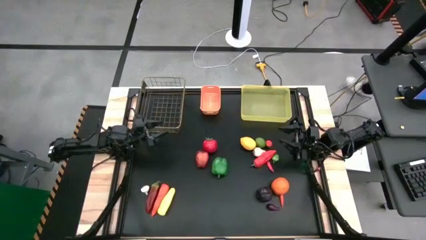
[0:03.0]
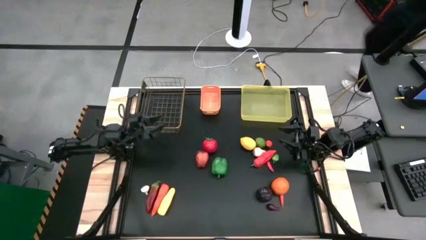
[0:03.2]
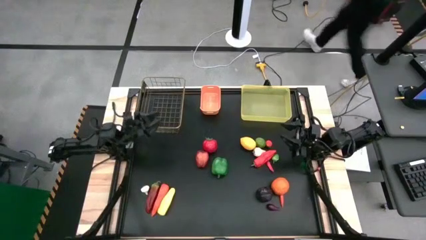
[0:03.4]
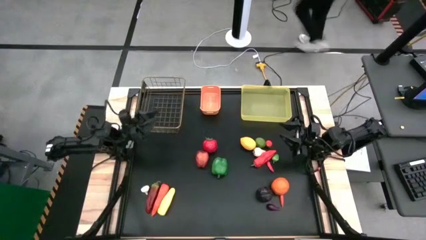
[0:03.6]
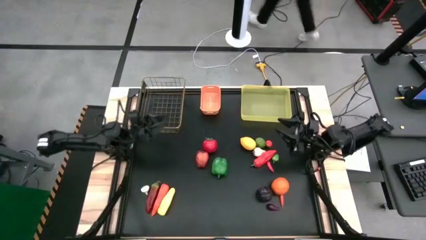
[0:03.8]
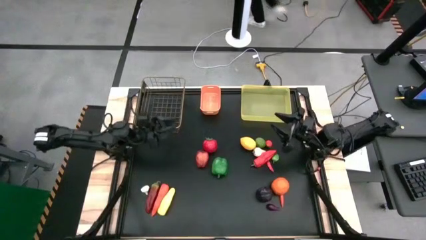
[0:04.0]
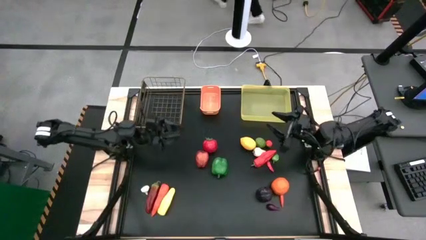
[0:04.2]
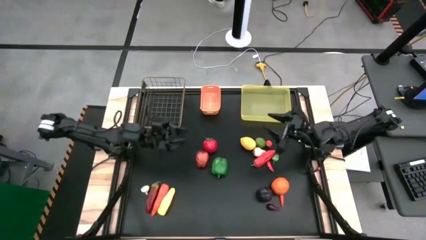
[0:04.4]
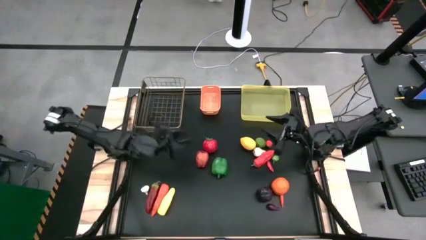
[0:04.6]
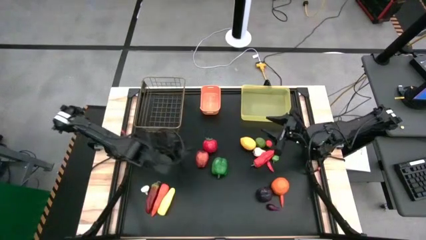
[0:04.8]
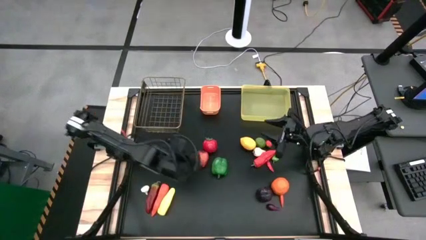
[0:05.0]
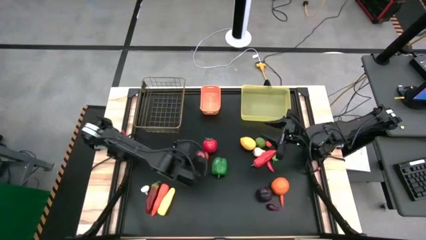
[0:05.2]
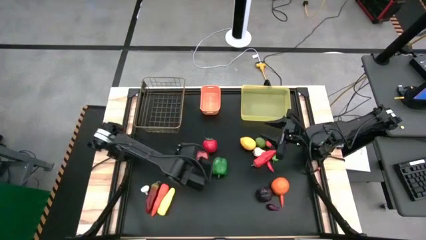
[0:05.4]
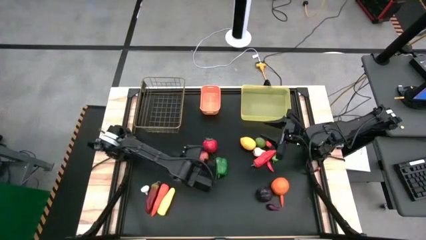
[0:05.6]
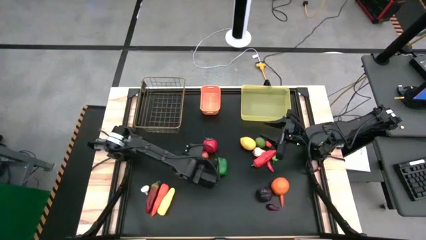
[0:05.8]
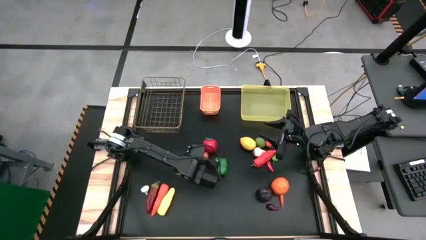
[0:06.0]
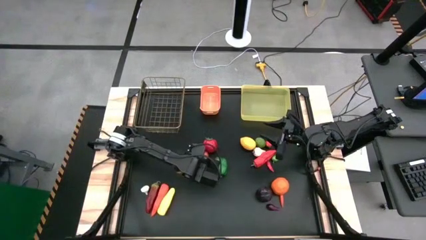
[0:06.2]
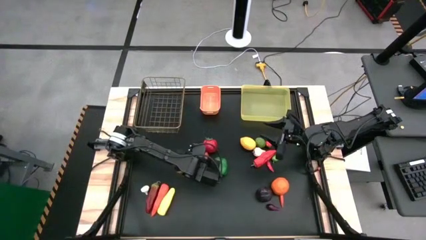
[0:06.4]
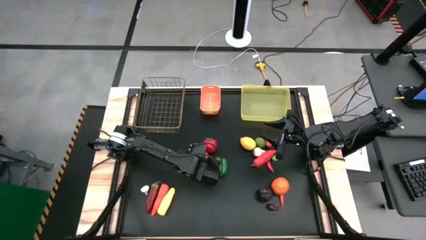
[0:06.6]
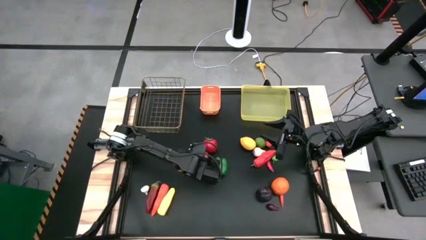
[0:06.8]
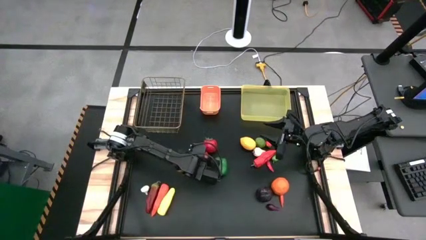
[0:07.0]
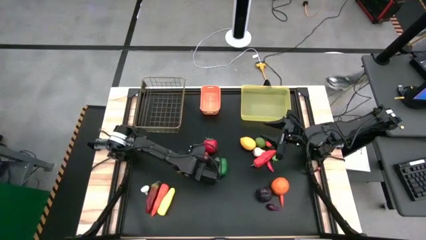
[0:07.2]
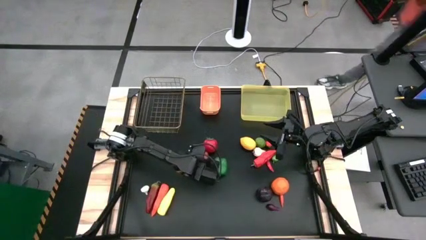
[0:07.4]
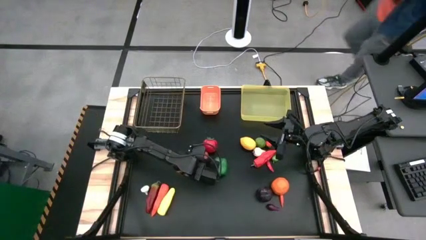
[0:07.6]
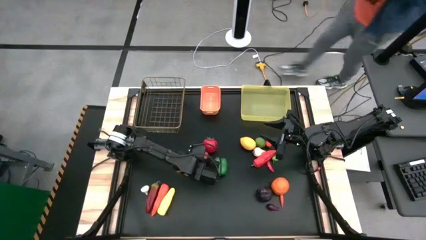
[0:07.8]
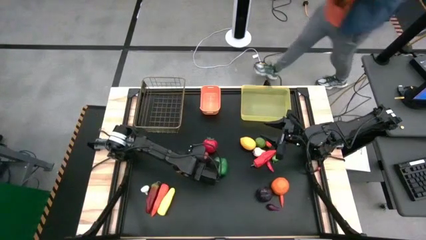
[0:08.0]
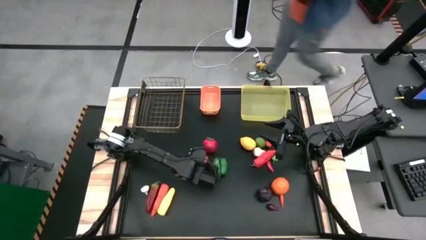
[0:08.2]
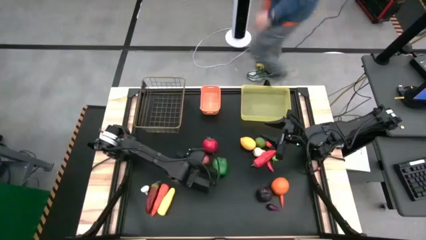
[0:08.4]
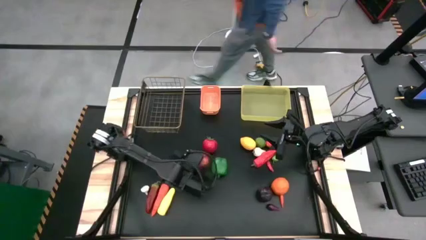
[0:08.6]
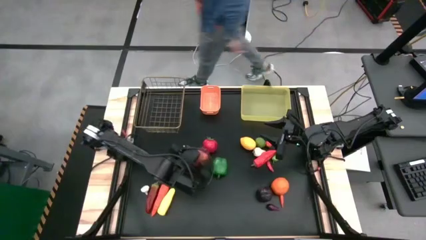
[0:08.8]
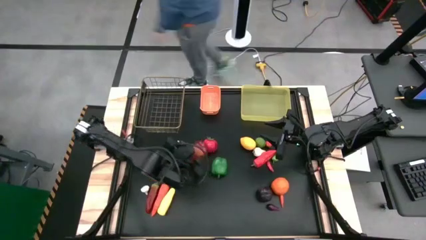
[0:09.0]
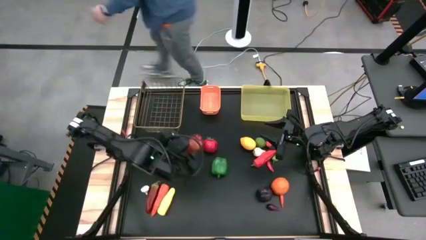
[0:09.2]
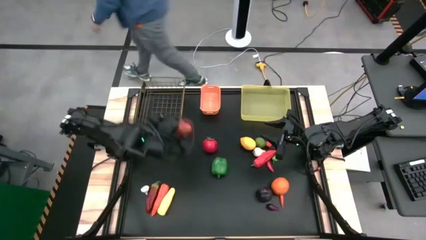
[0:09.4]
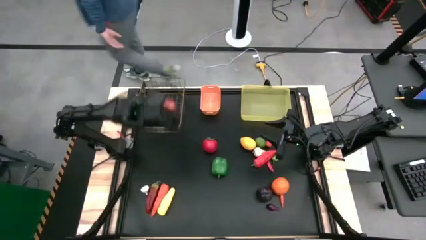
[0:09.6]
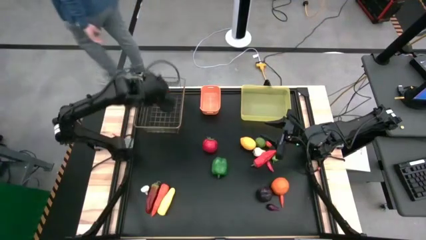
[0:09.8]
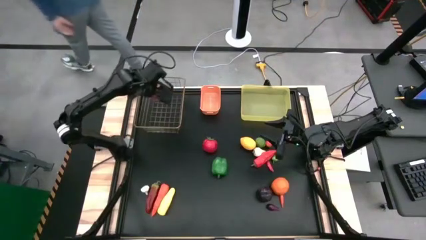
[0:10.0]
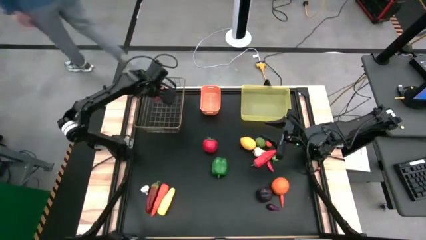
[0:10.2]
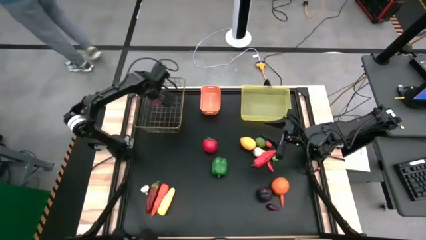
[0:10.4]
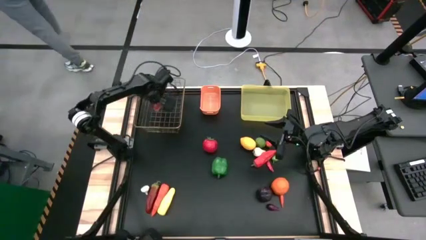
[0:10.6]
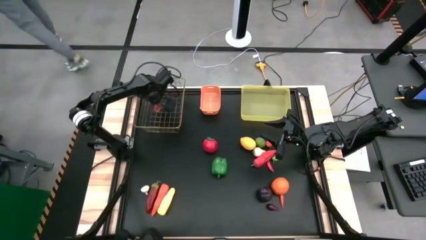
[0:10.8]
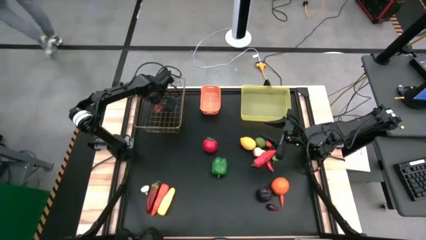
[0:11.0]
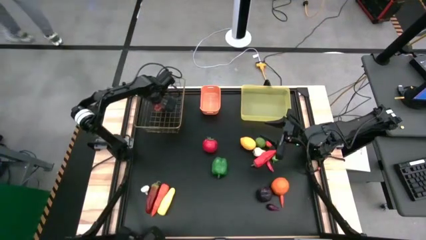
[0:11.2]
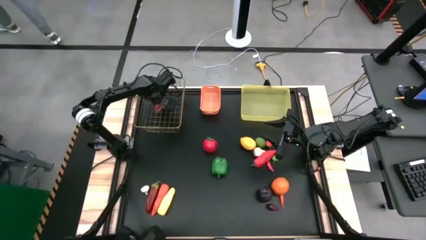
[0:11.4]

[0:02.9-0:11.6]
Task: Sort produce into baskets
Put the red apple into the wire basket

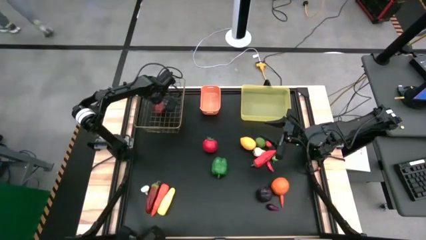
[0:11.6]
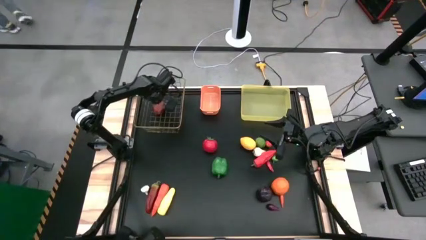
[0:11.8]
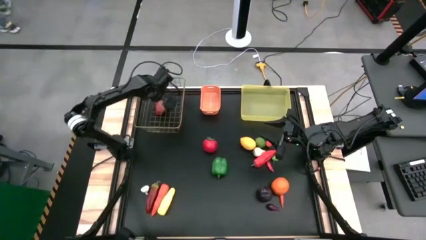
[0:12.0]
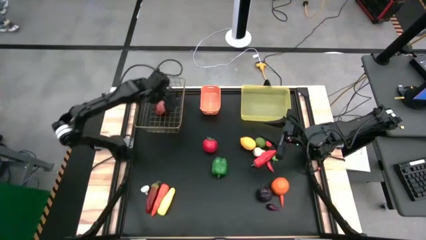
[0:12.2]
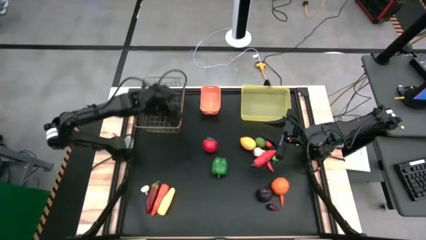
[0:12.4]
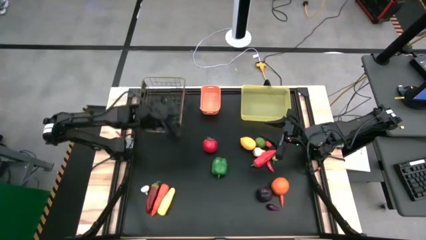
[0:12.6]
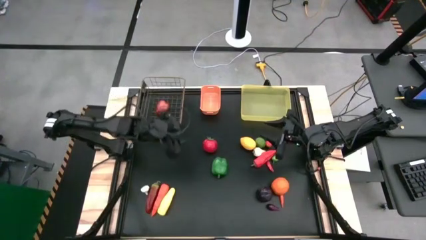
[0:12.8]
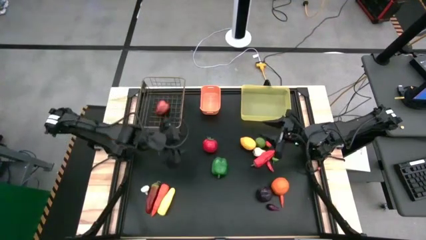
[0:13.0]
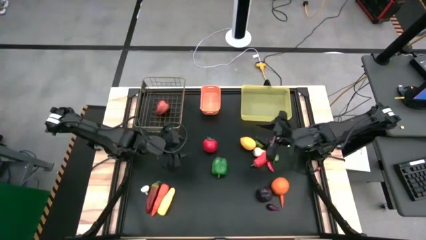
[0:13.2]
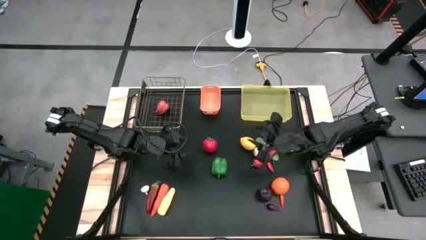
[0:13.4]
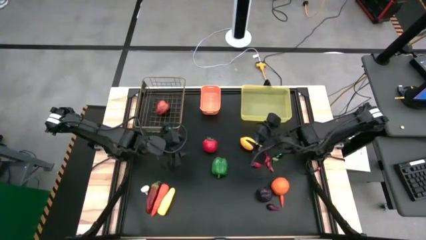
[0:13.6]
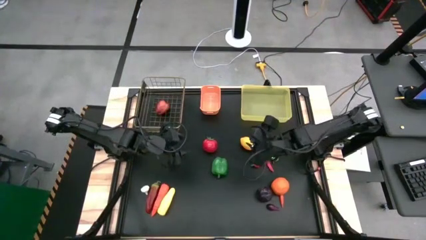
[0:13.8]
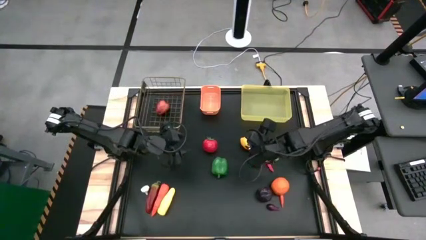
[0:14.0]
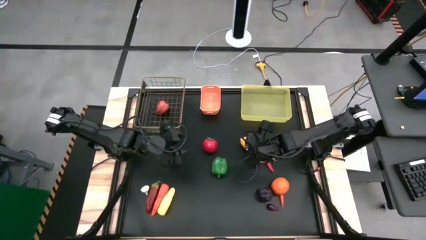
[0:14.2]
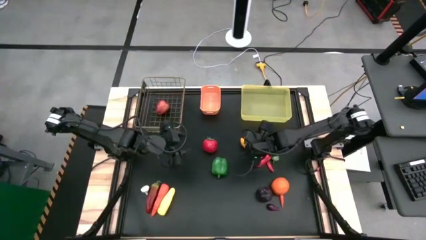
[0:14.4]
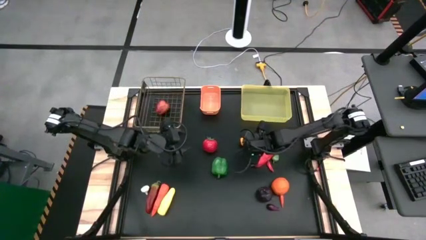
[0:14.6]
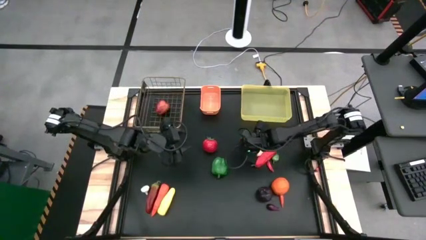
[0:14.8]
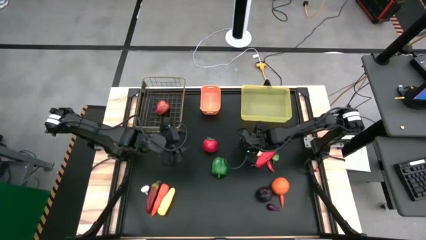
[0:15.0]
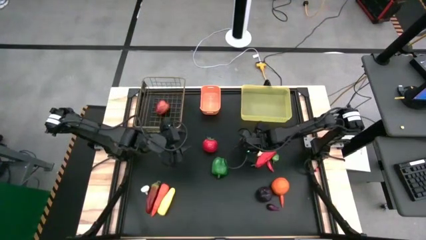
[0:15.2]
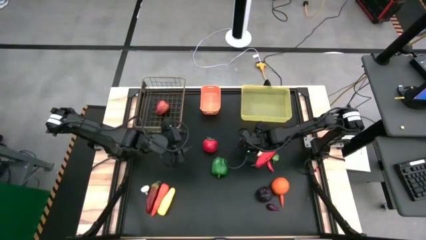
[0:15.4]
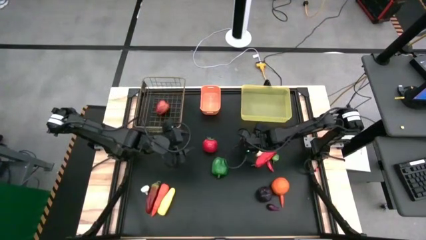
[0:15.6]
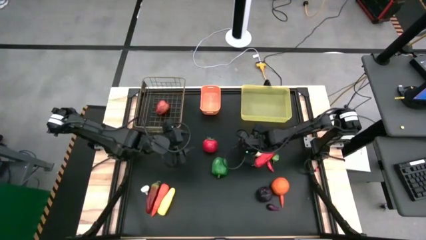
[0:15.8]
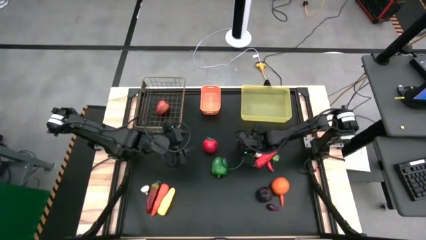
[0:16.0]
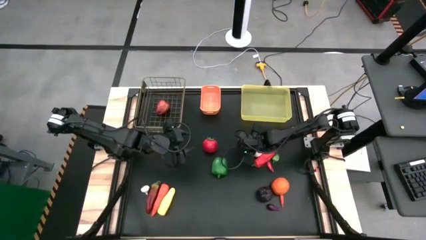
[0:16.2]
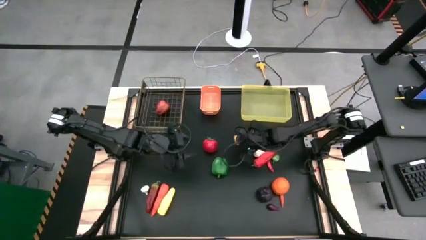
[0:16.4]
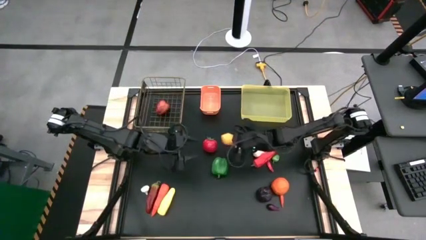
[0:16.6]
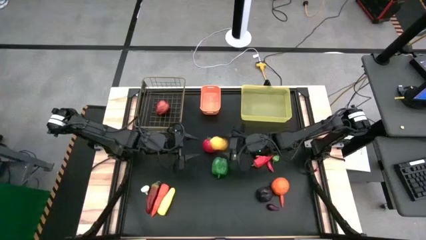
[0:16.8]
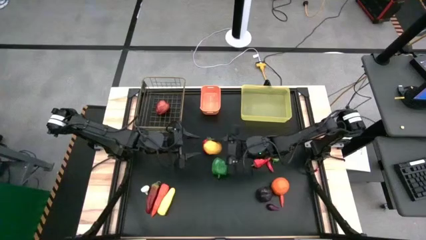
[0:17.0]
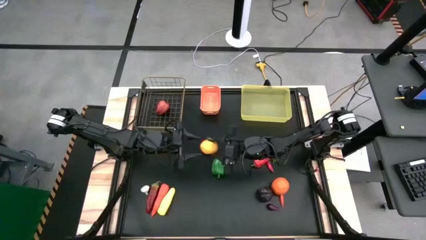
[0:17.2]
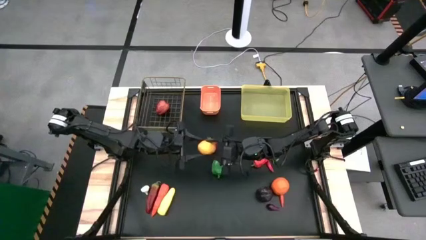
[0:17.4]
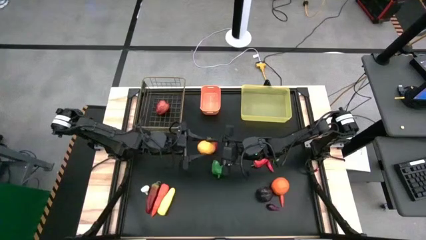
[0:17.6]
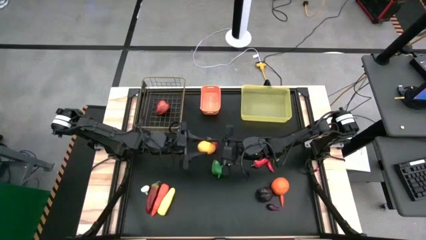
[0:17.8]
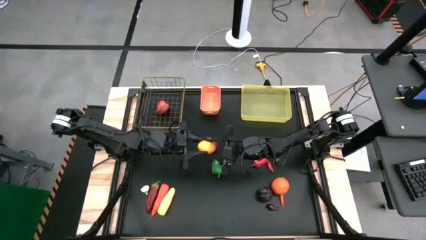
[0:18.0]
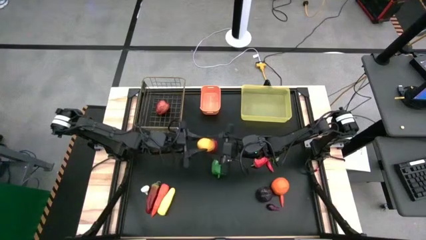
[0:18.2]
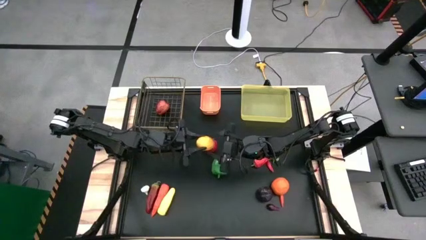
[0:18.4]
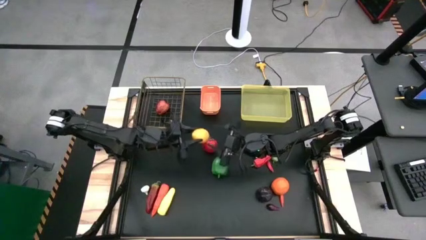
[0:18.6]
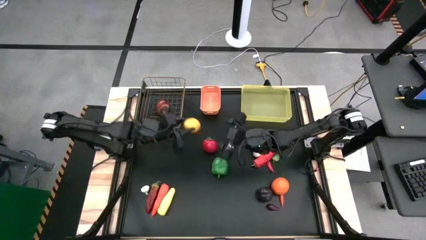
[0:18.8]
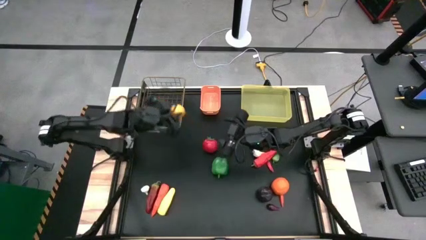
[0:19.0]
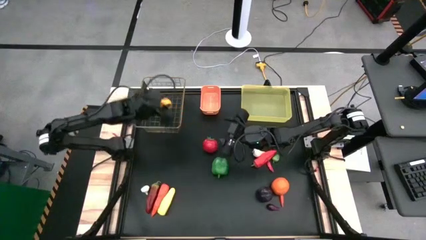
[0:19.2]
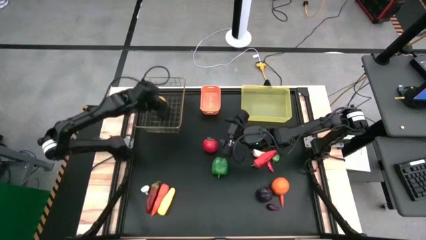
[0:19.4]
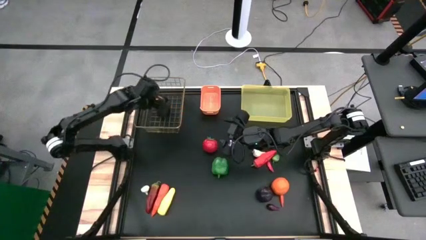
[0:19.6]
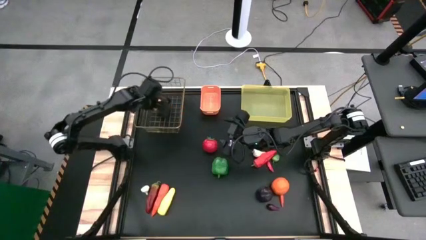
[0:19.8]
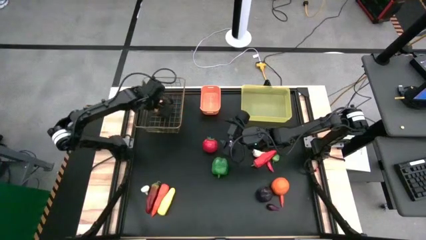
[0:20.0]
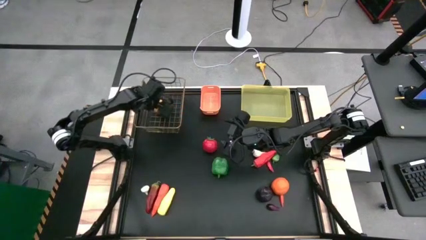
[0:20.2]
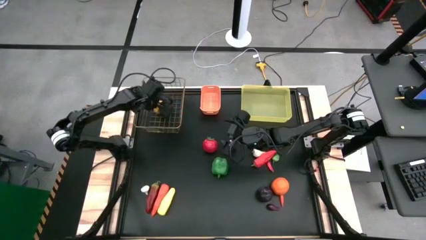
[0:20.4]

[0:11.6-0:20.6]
Put the yellow lemon into the wire basket
